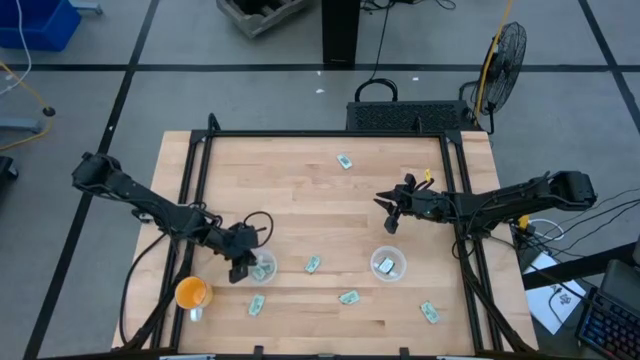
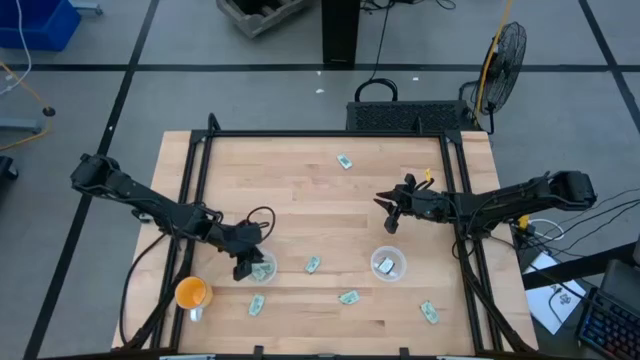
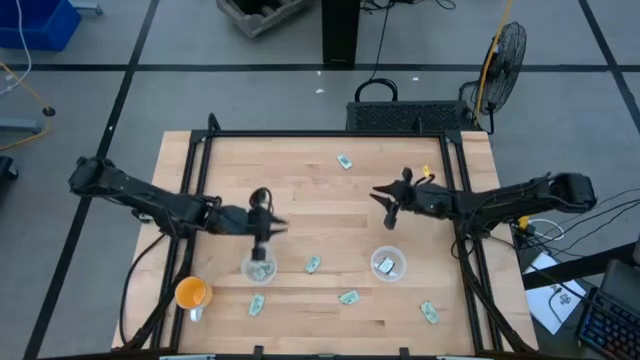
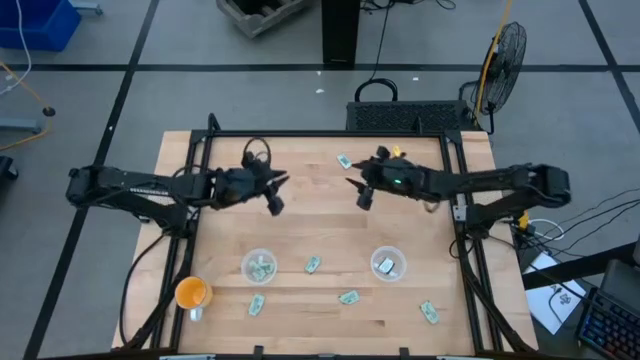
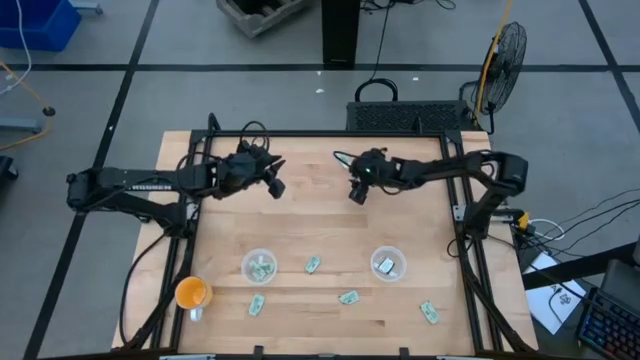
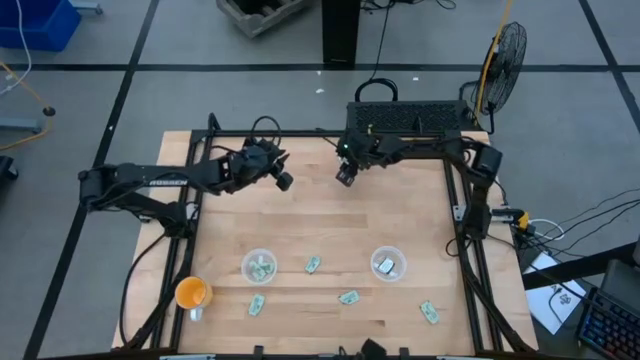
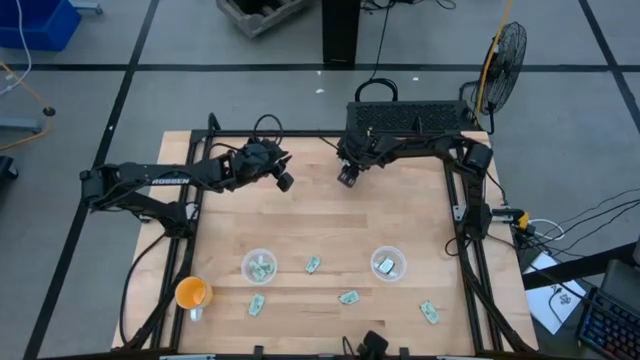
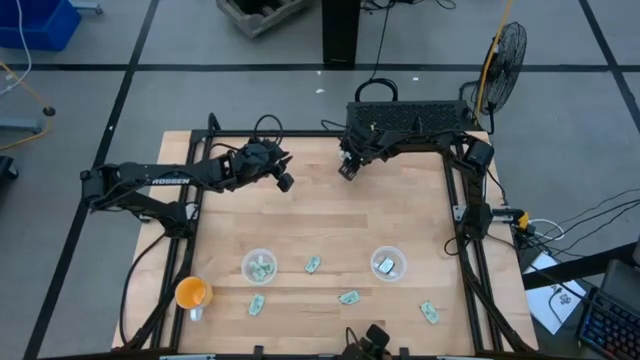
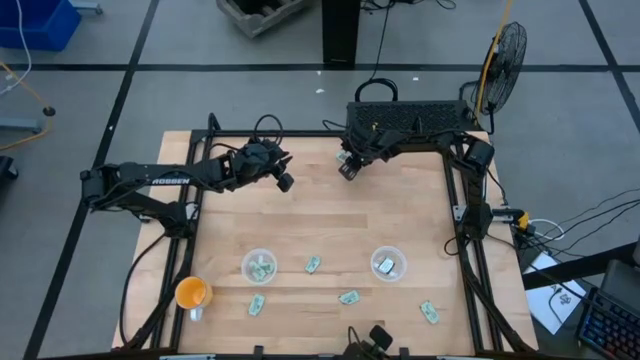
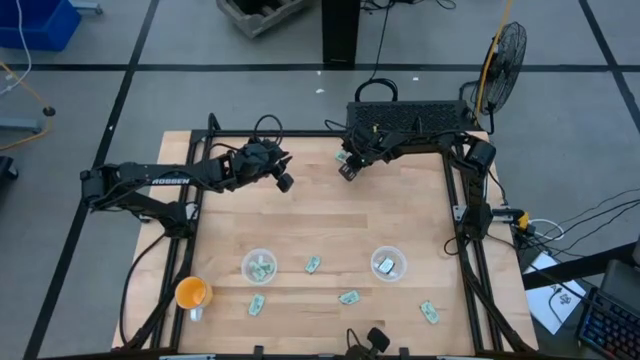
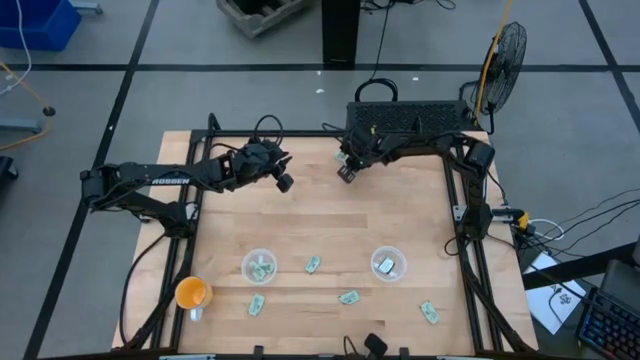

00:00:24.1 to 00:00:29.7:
Task: Pick and place Stevia / Truvia into bins
Put the light green stevia packet into the right transparent container

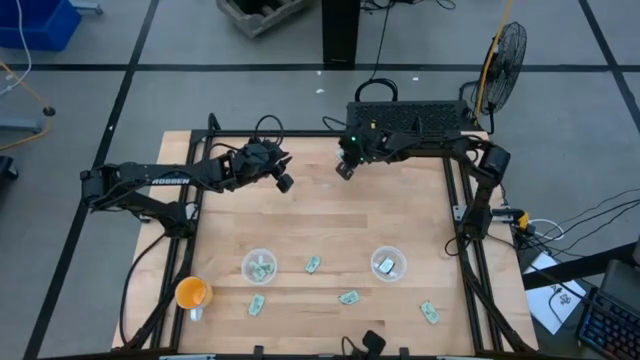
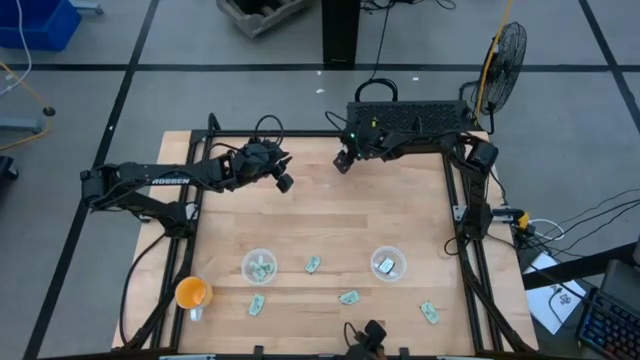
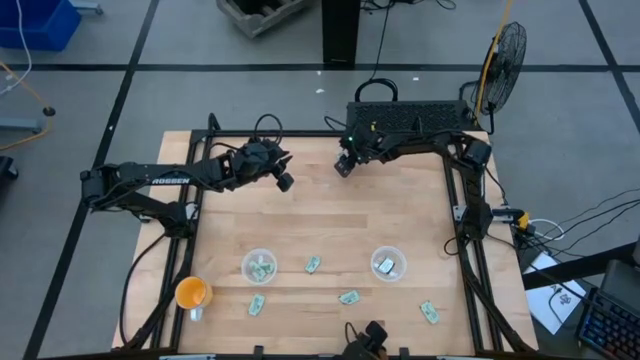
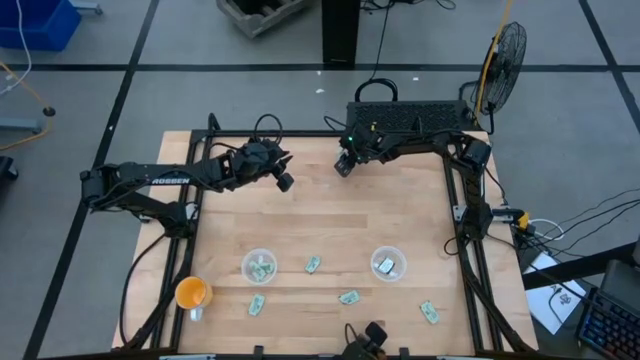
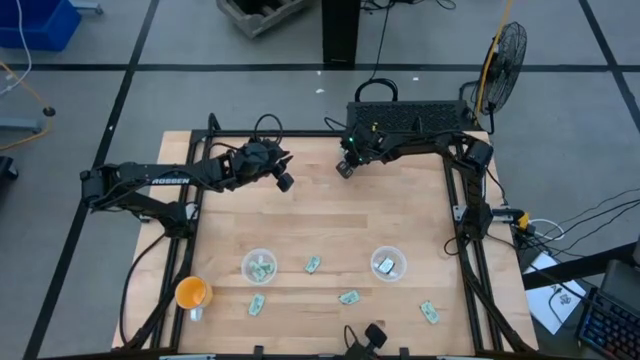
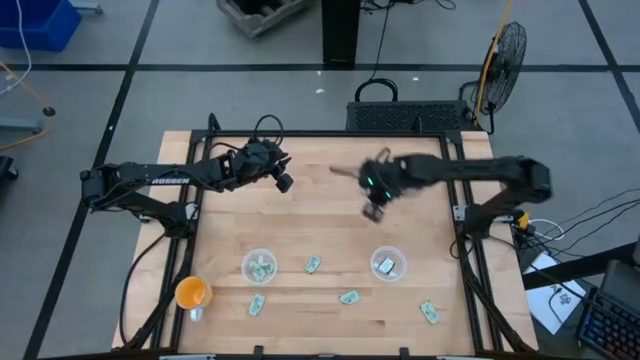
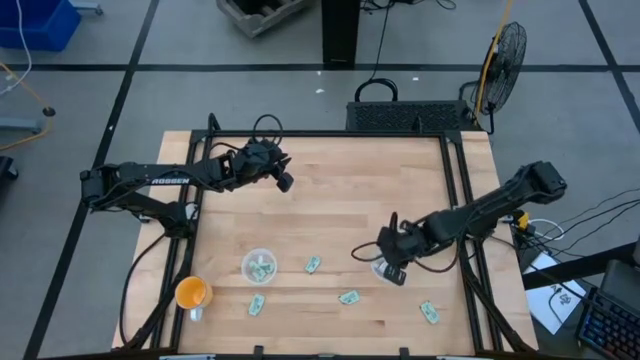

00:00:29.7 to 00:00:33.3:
Put the light green stevia packet into the right transparent container

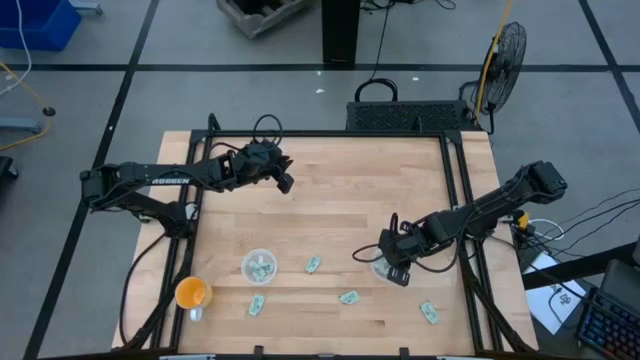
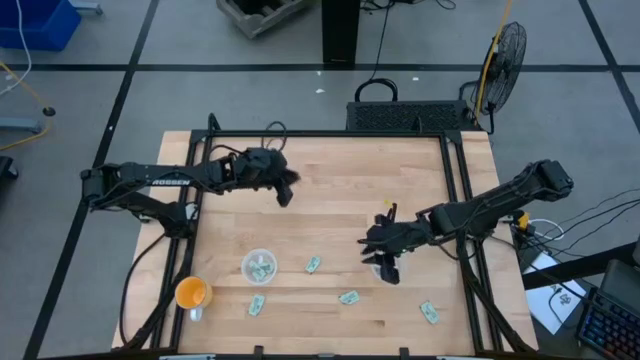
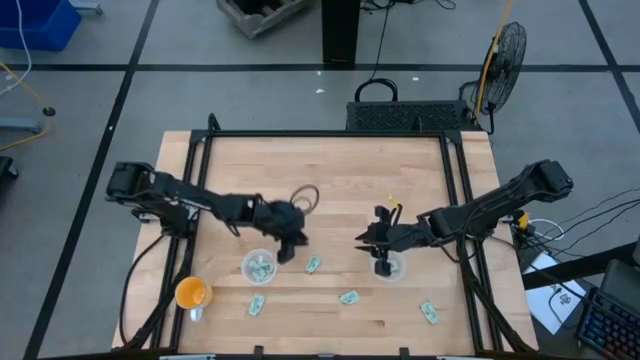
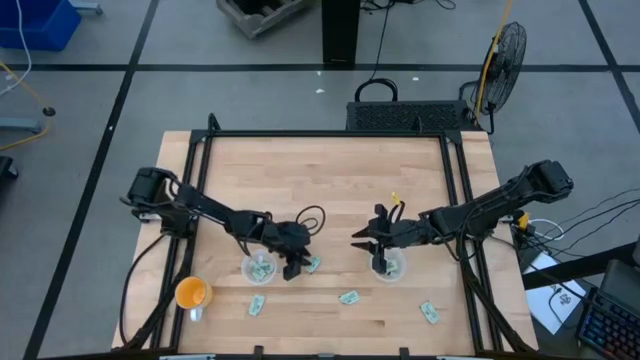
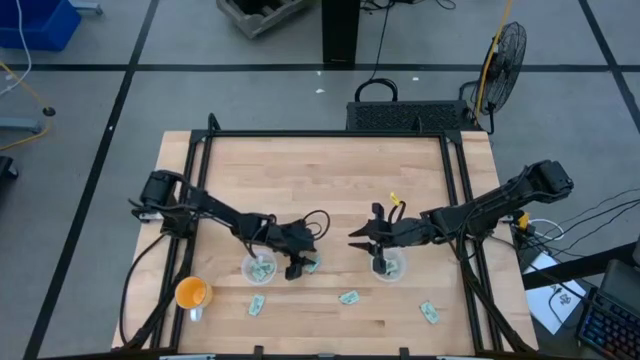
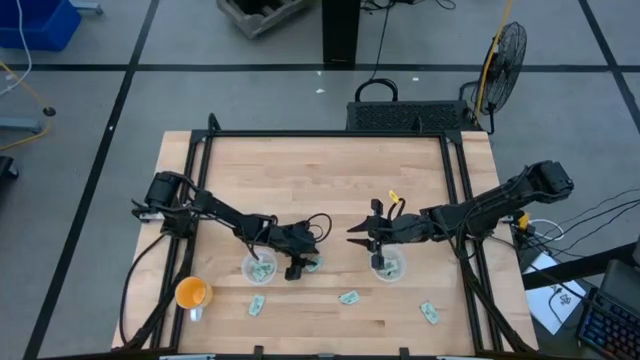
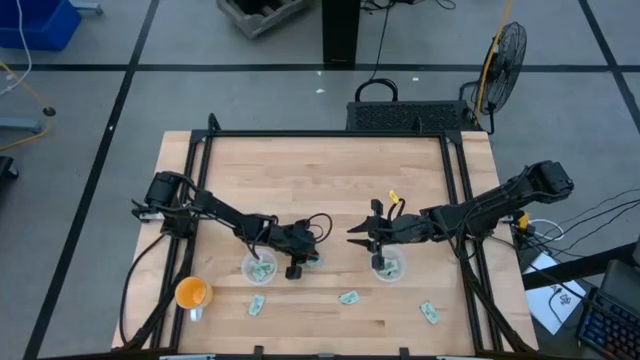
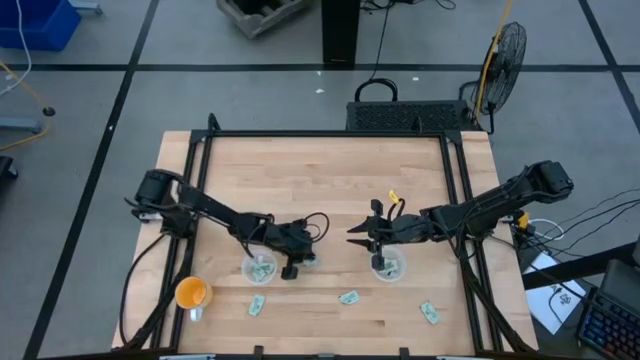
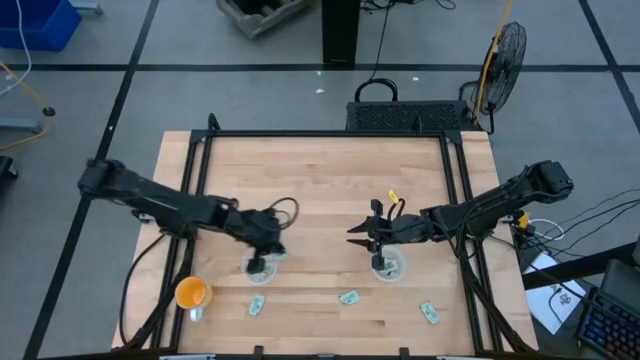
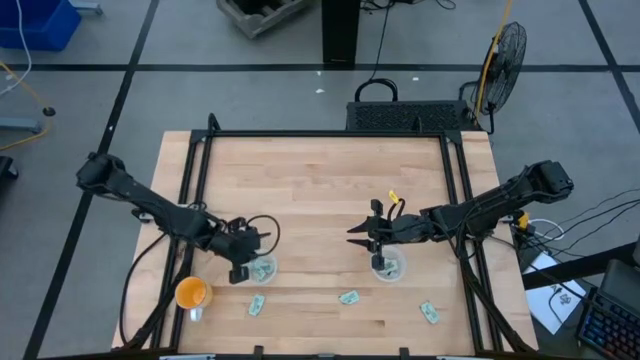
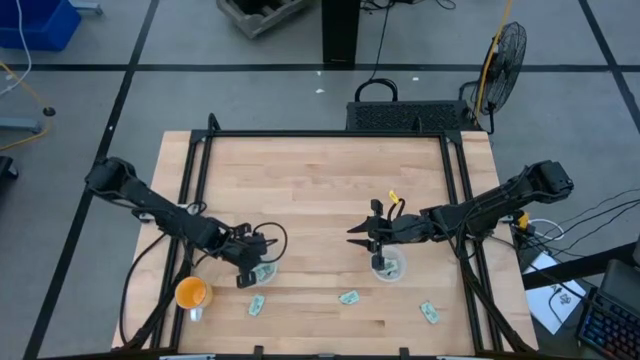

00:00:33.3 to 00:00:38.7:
Put the light green stevia packet into the left transparent container

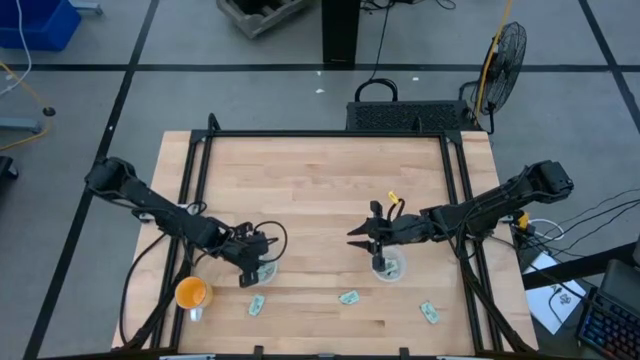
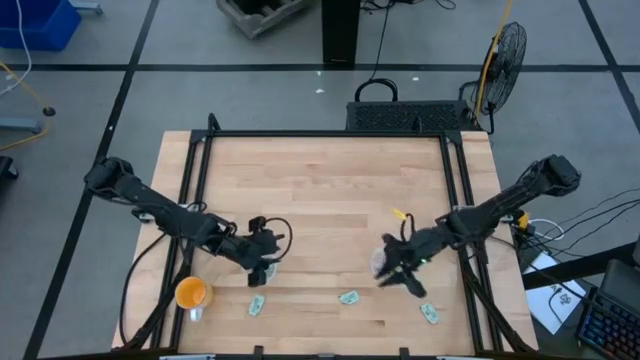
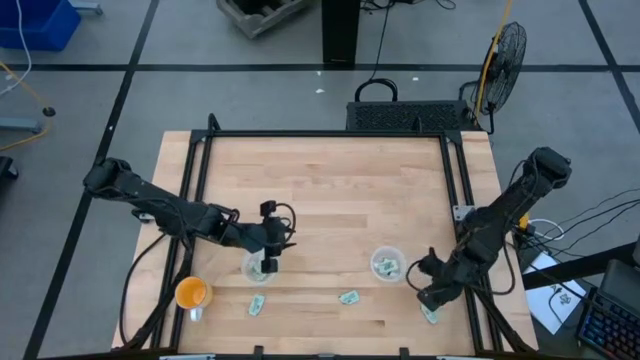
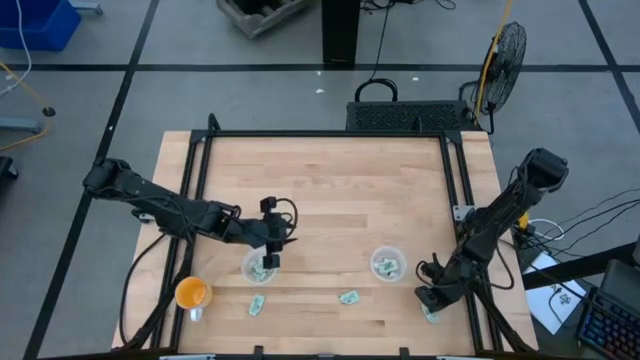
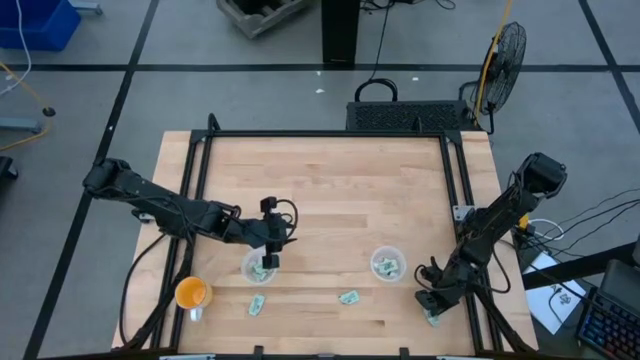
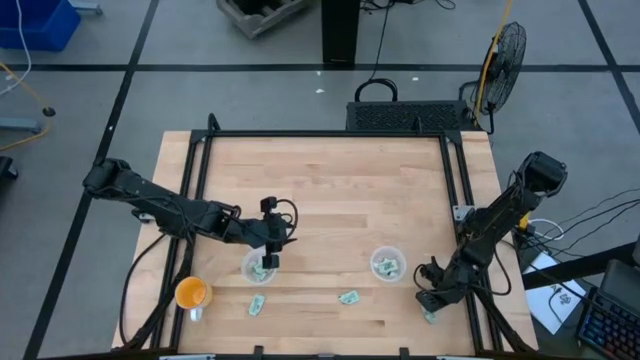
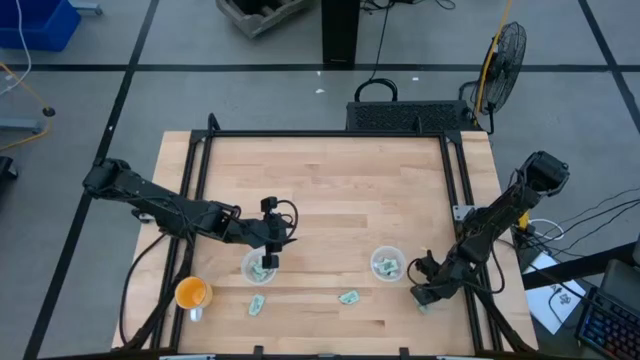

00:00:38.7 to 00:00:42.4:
Put the right light green stevia packet into the right transparent container

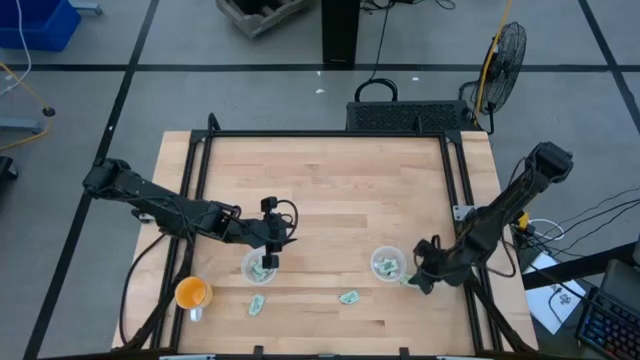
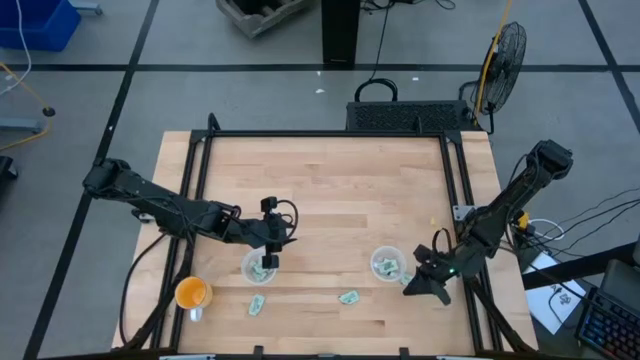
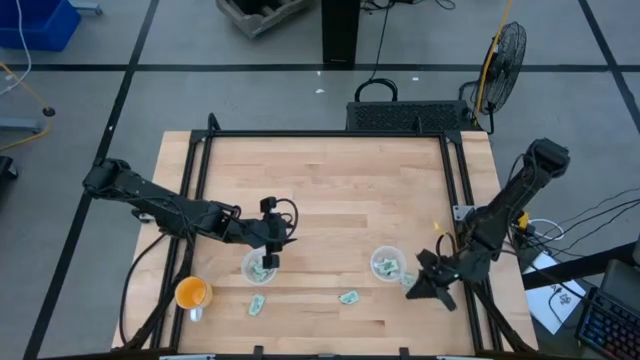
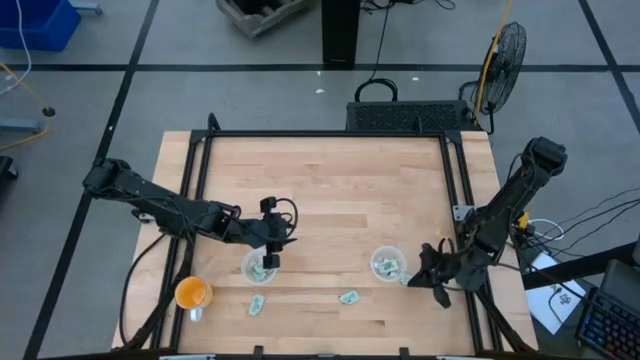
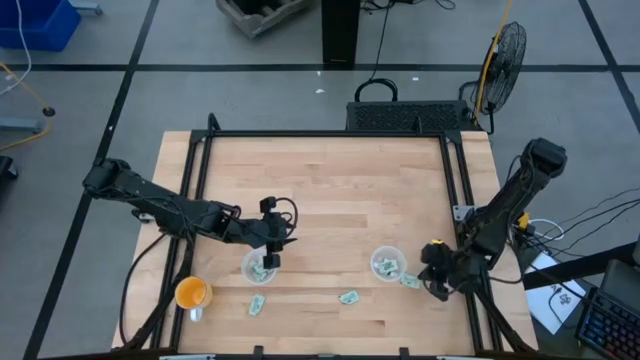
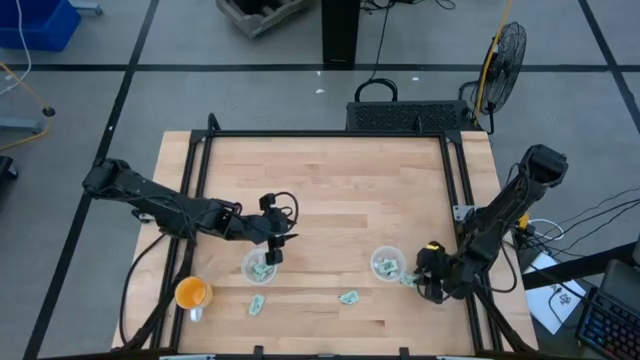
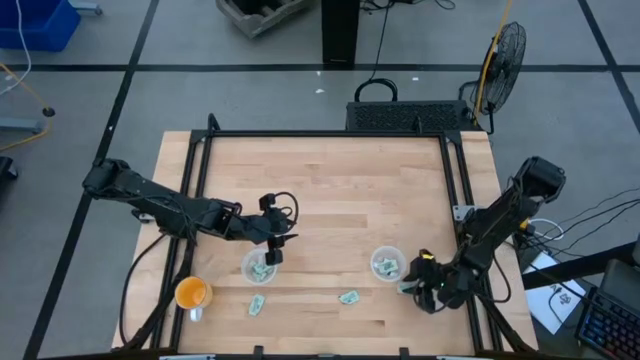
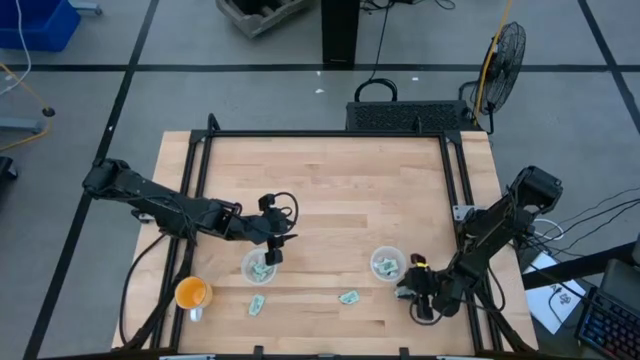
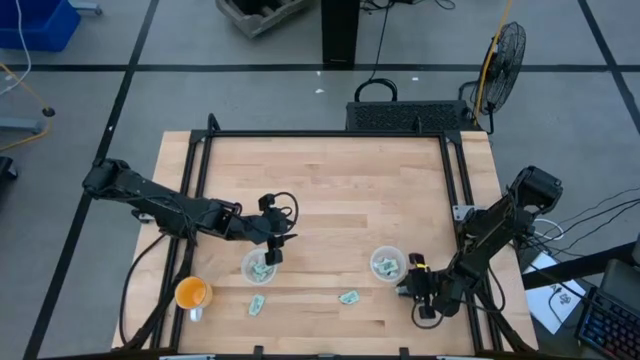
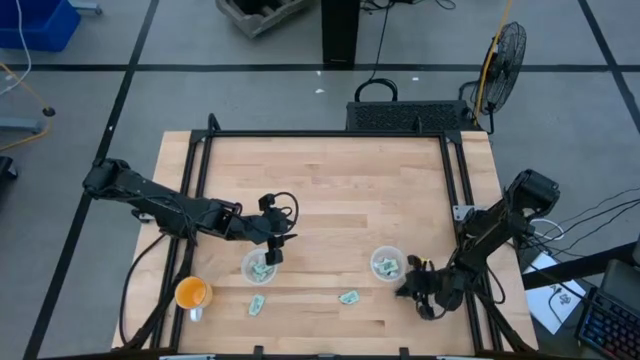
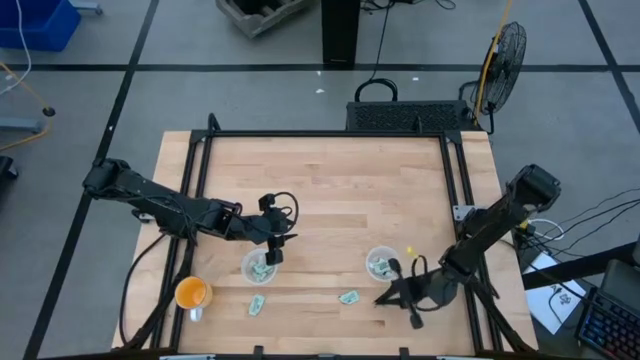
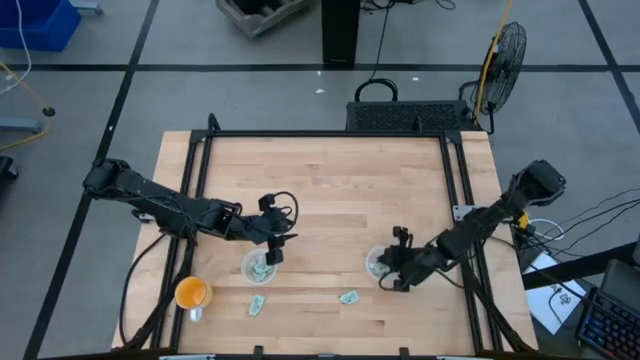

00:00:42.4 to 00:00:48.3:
Put the right light green stevia packet into the right transparent container
